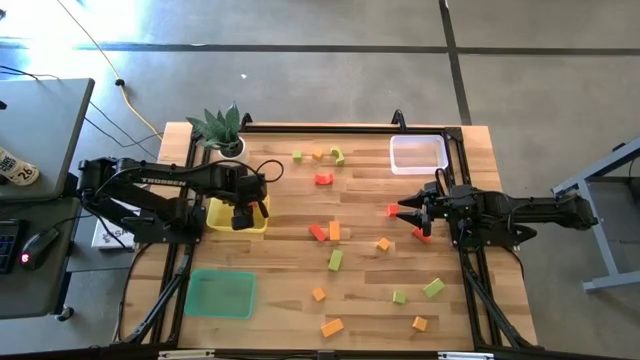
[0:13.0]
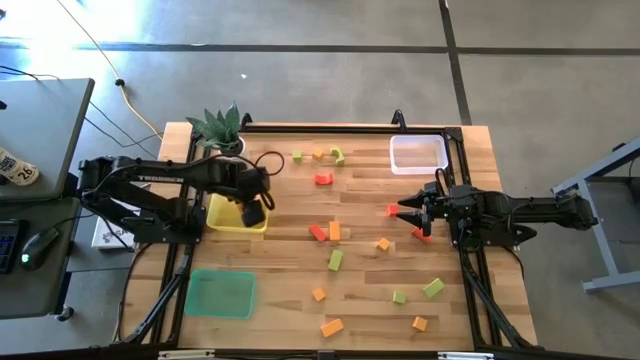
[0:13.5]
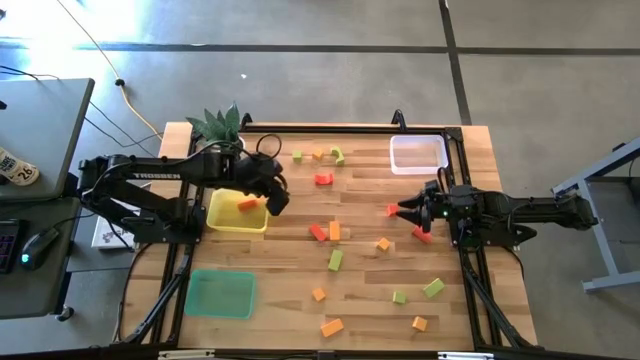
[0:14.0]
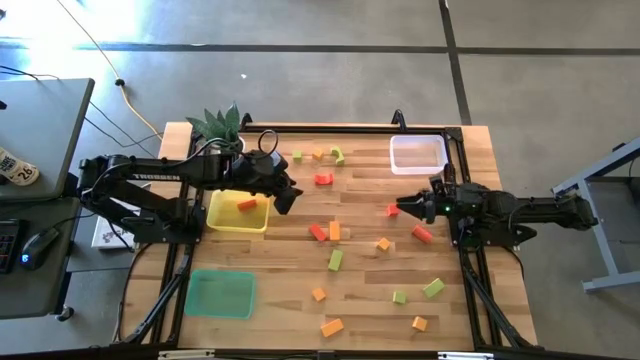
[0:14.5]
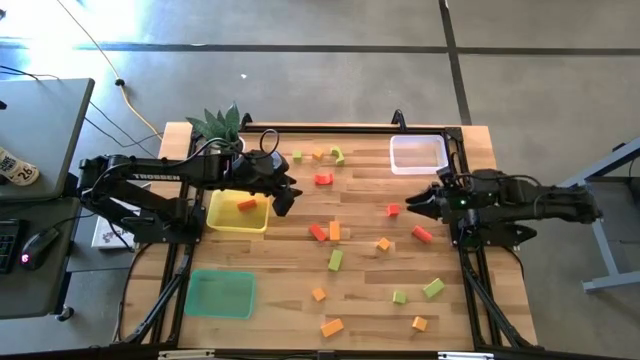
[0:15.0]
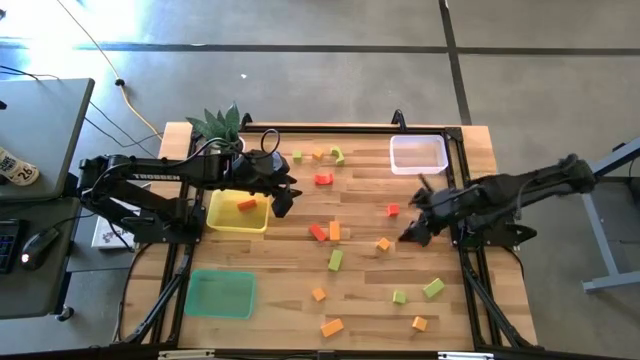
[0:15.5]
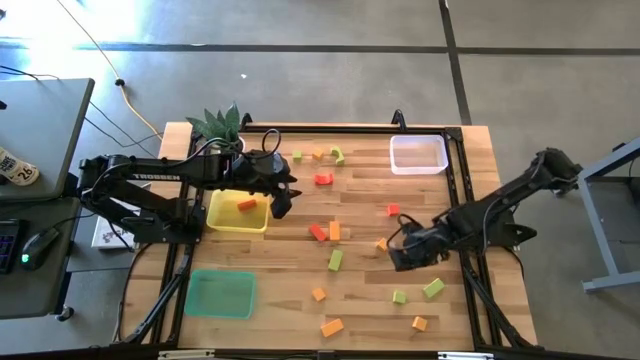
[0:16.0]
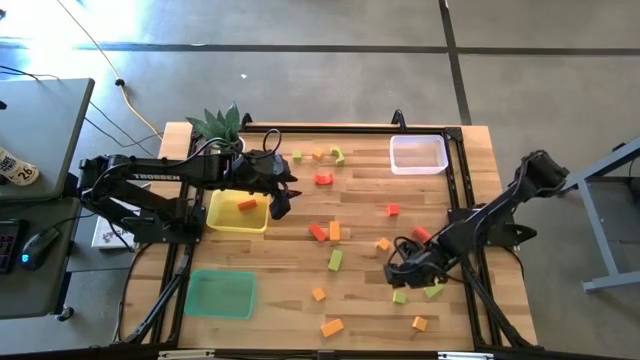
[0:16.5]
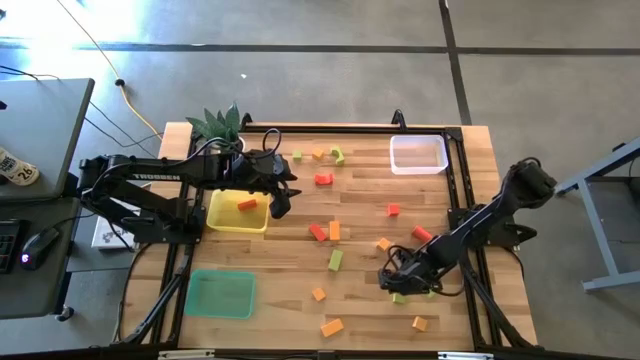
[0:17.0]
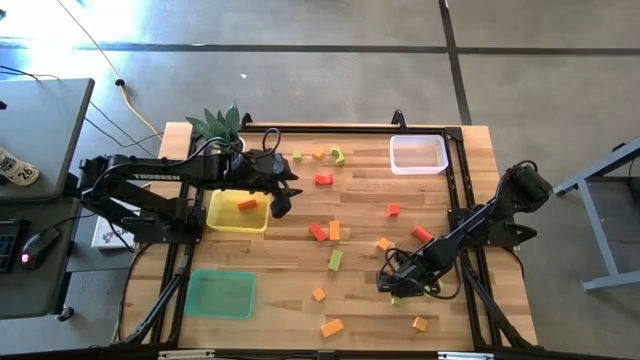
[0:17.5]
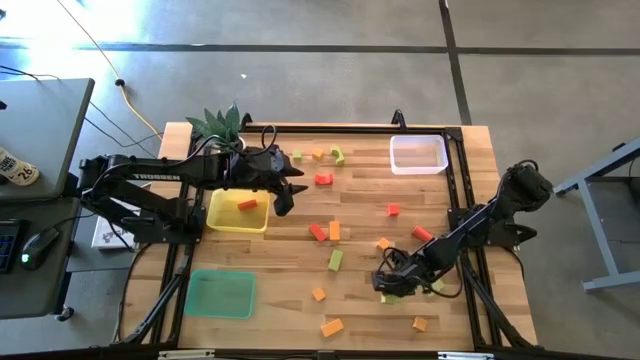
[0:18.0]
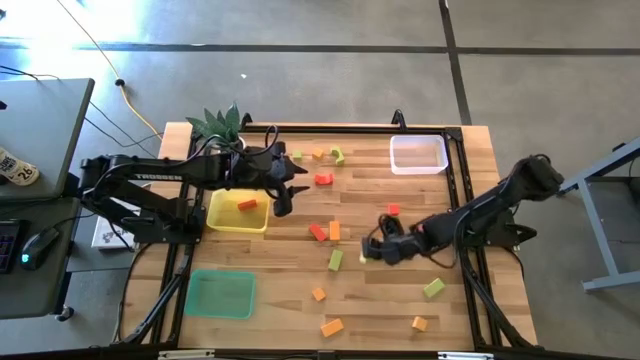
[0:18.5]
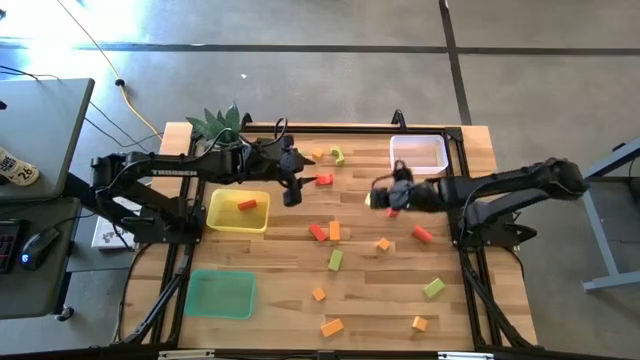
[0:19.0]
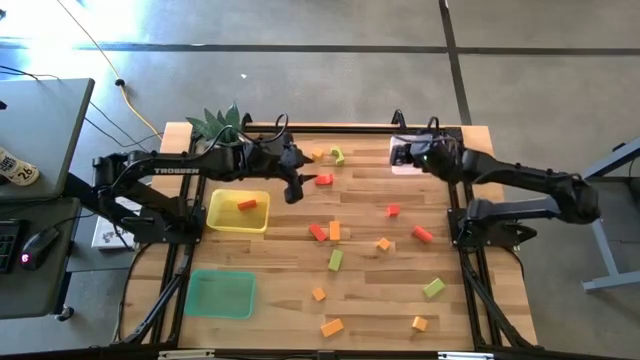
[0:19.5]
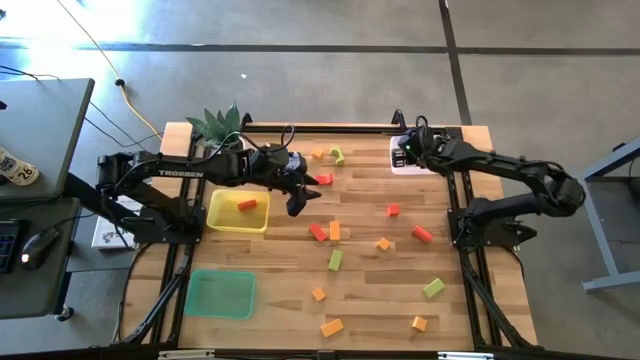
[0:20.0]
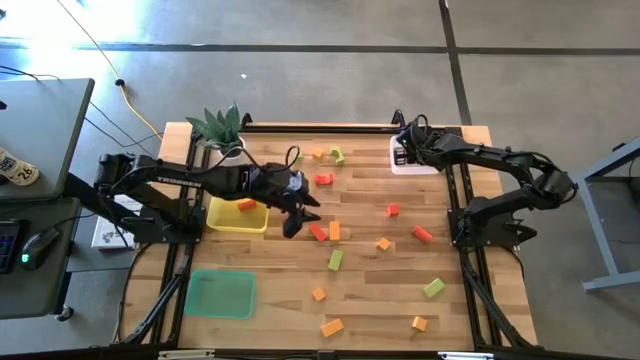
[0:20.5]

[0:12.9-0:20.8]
Task: Sort & place blocks by color
Put the green block into the white bin

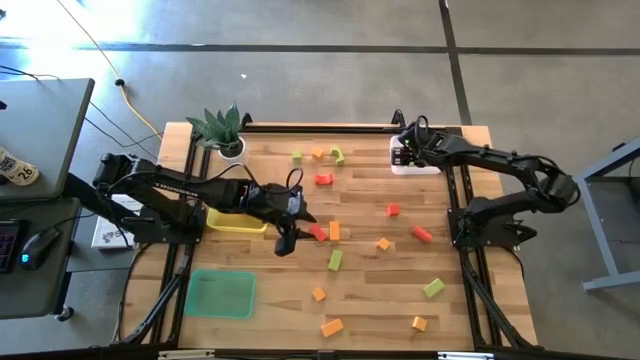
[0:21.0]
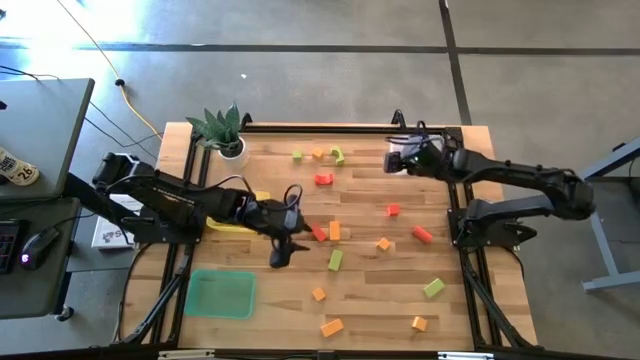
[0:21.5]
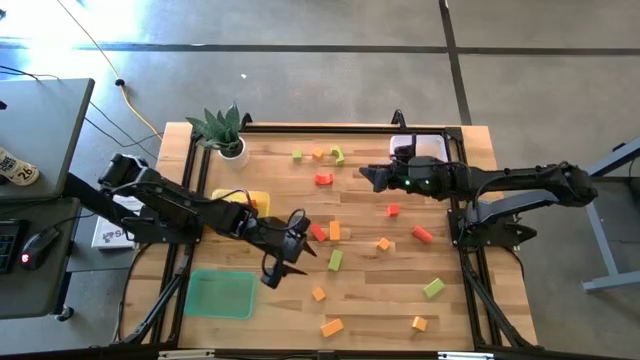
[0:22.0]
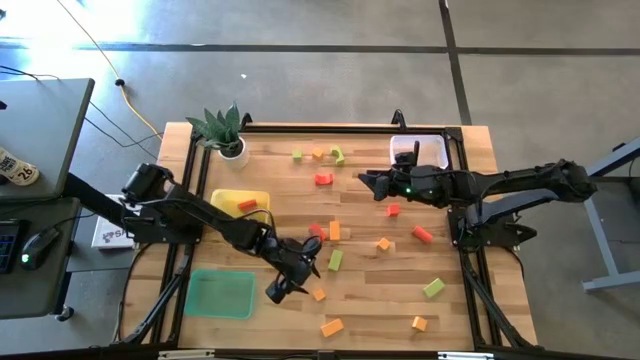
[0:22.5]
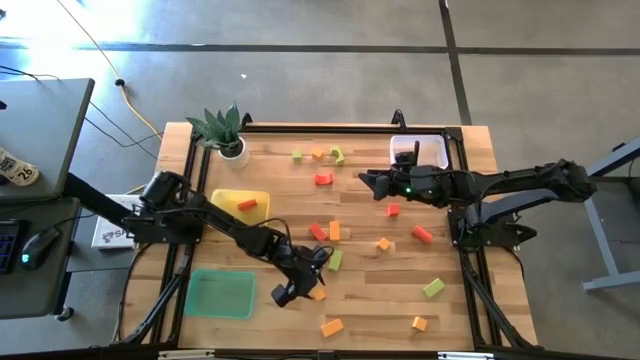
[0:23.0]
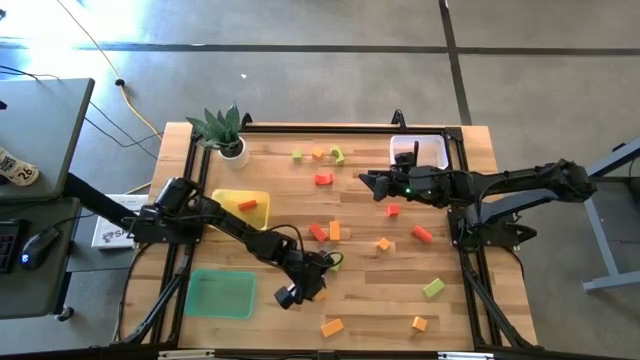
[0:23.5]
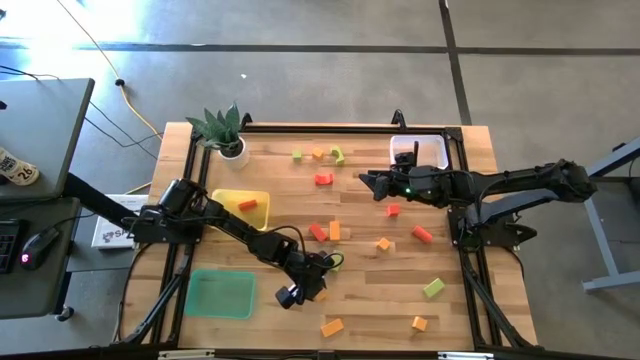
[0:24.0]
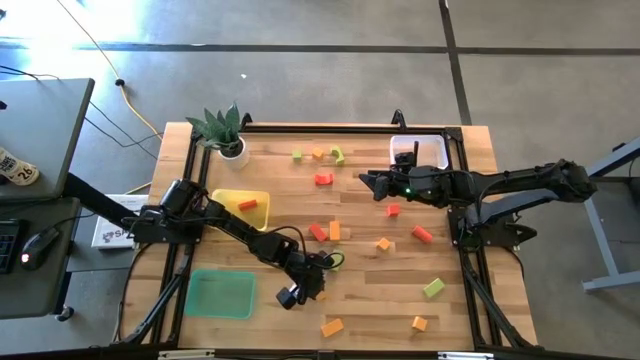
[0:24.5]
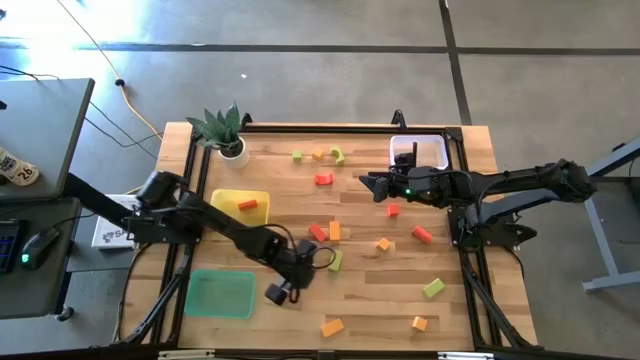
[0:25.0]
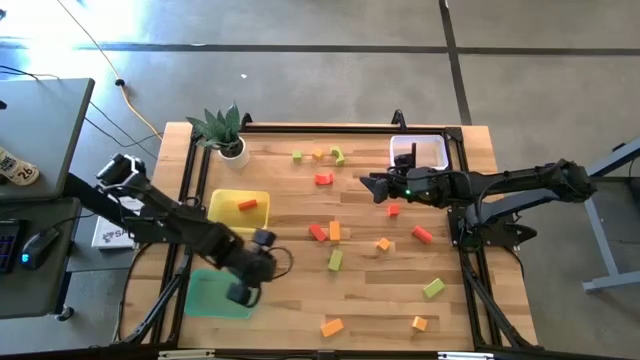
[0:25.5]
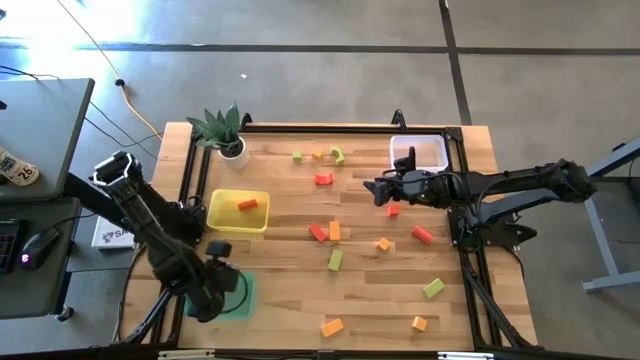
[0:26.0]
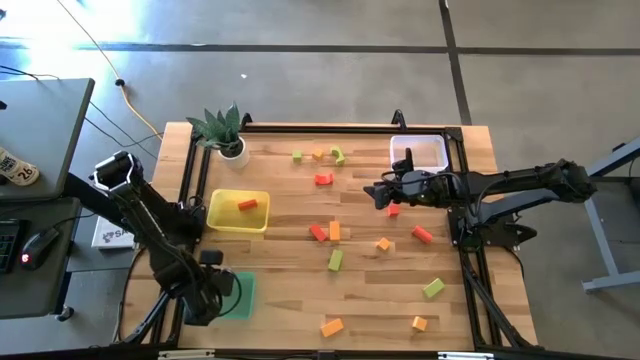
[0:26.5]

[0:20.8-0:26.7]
Put the yellow block into the green bin

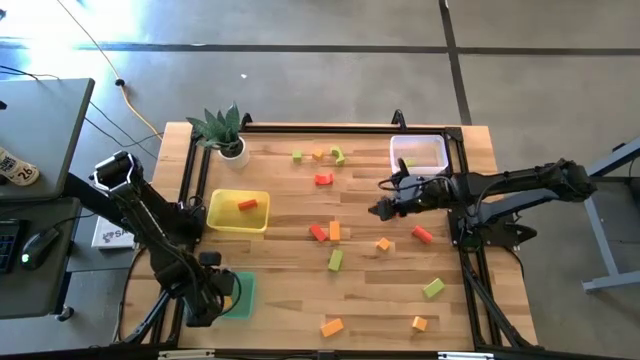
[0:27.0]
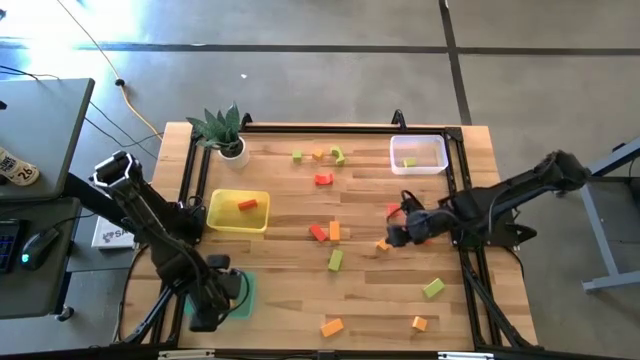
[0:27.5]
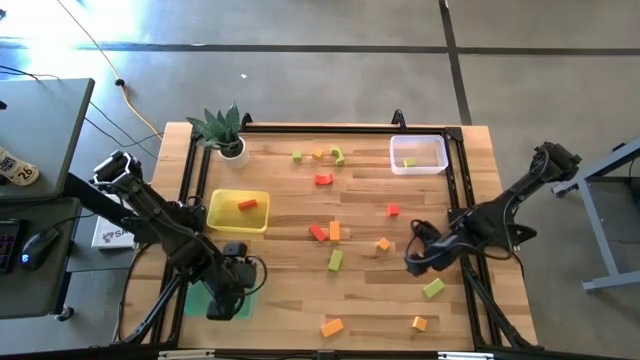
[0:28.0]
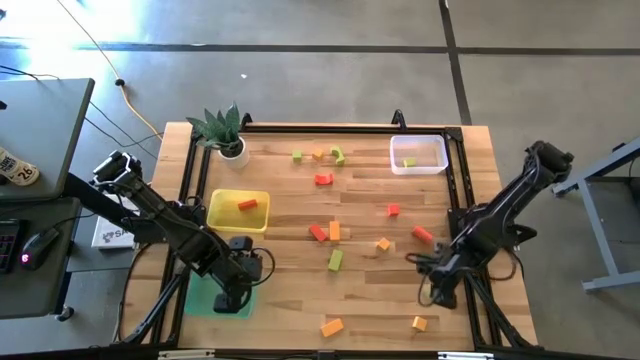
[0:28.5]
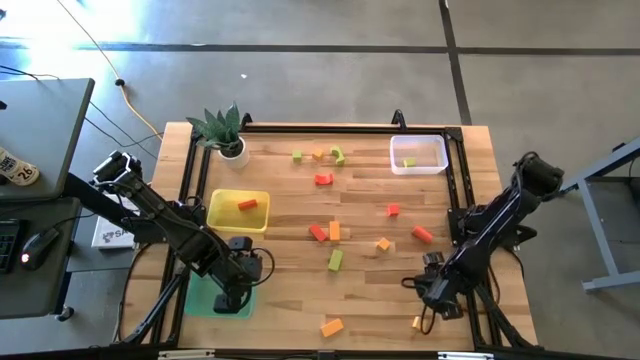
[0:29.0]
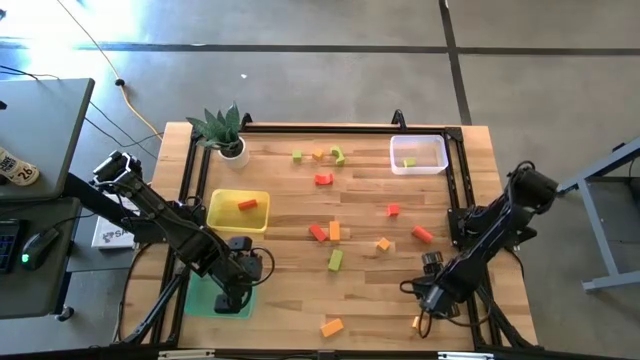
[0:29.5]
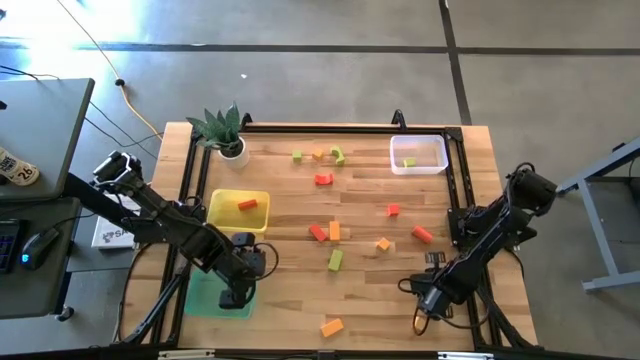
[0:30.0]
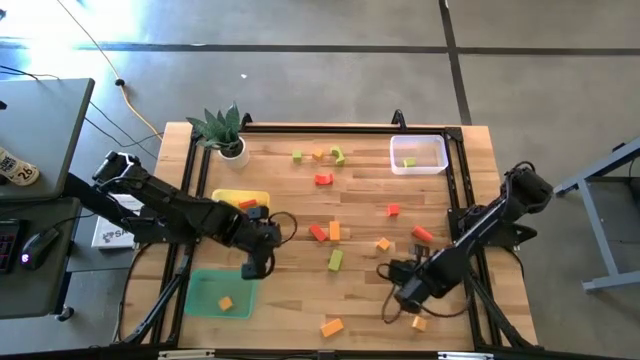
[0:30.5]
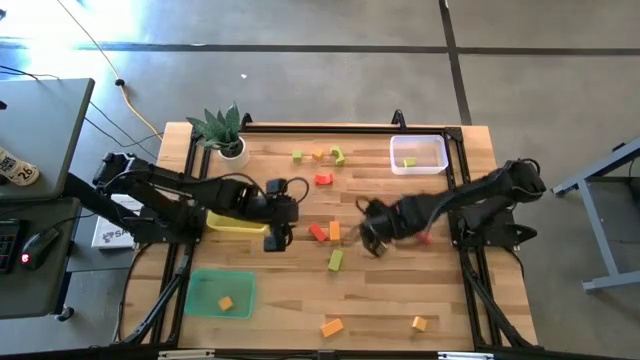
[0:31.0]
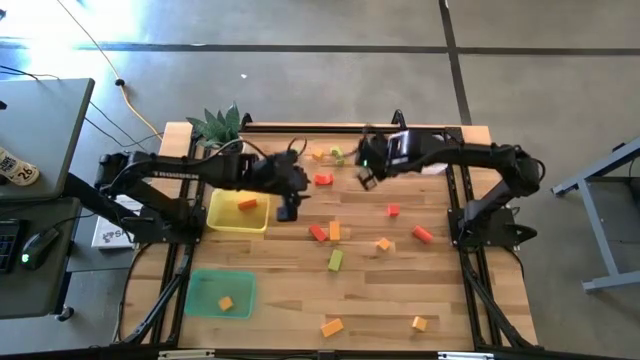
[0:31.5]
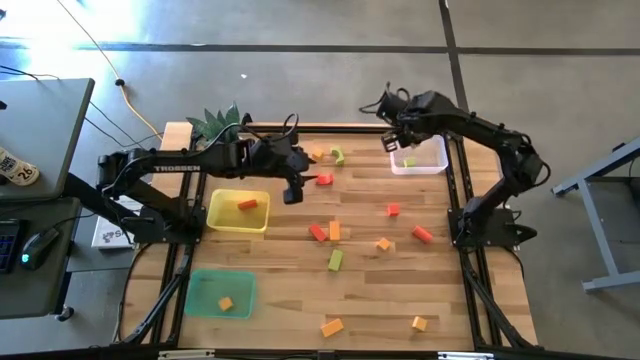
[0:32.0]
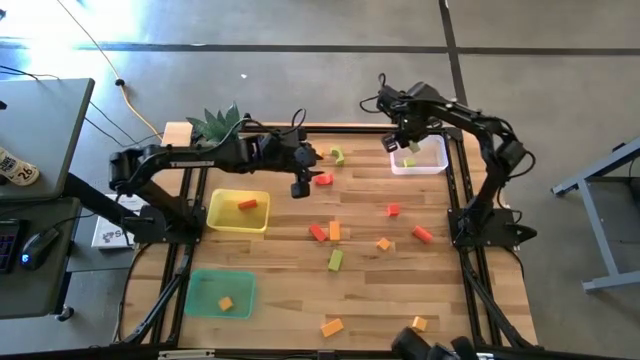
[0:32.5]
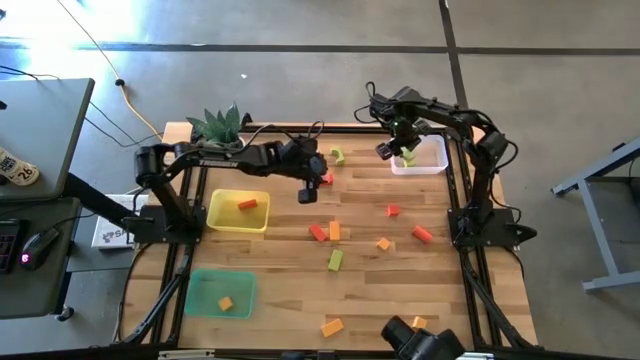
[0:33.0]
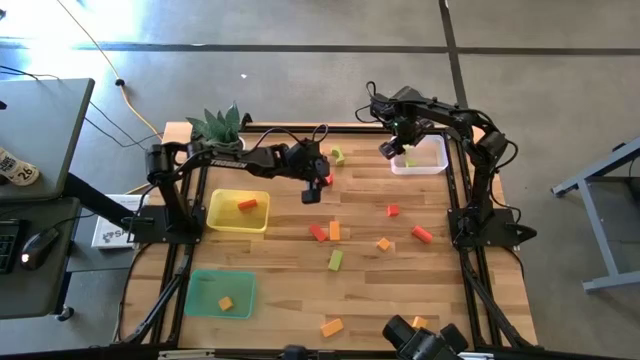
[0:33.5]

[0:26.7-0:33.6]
Put the green block into the white bin

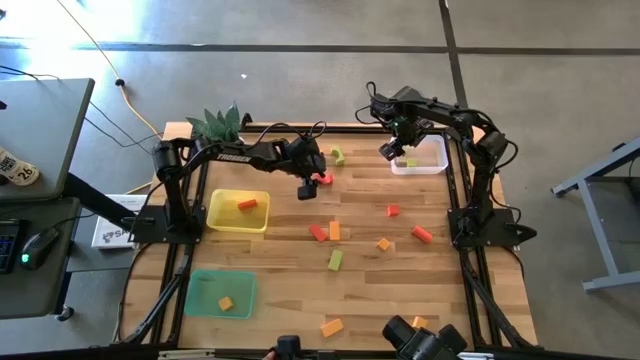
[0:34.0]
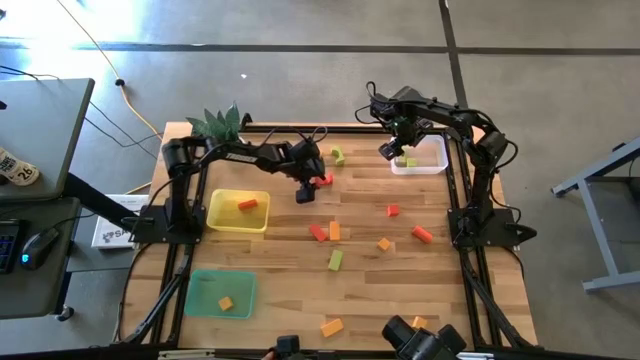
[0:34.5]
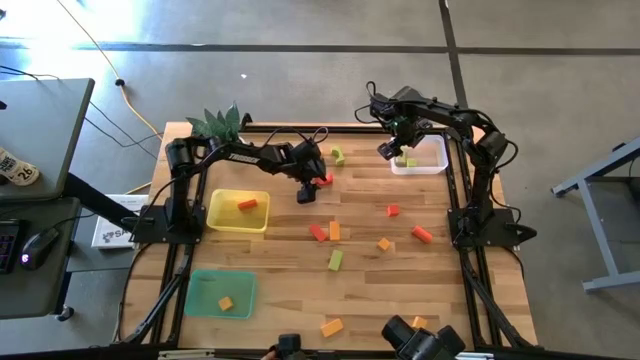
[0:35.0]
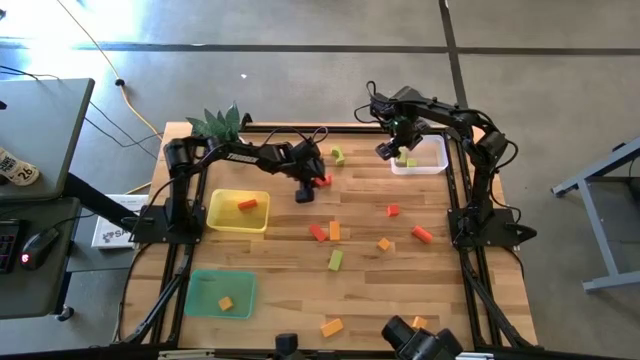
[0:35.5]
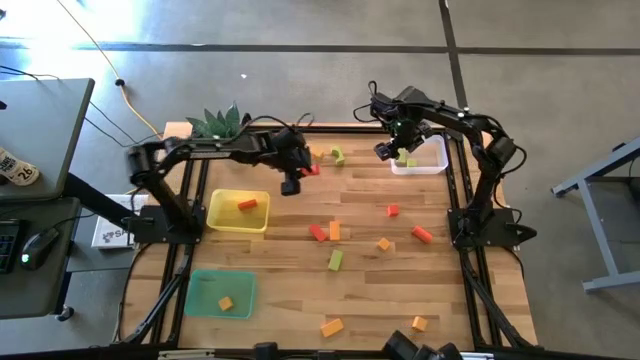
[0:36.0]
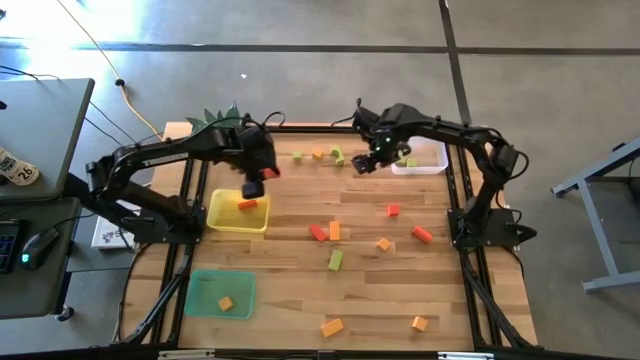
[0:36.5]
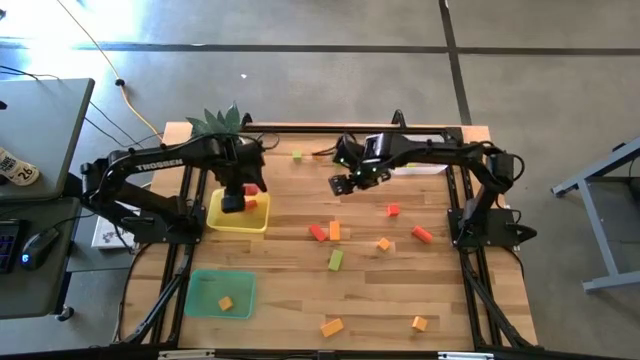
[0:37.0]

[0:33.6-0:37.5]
Put the orange block into the yellow bin
